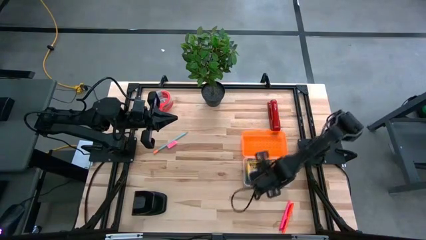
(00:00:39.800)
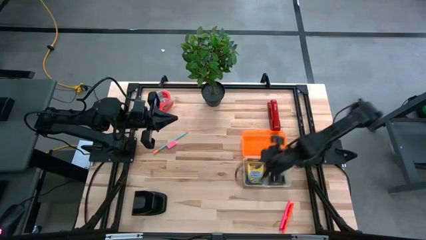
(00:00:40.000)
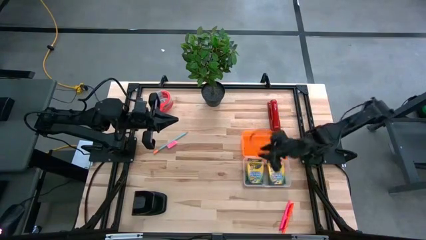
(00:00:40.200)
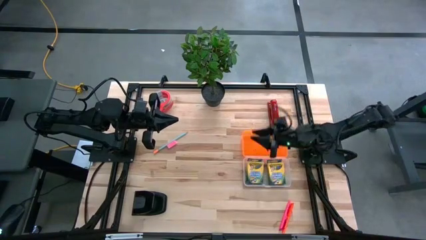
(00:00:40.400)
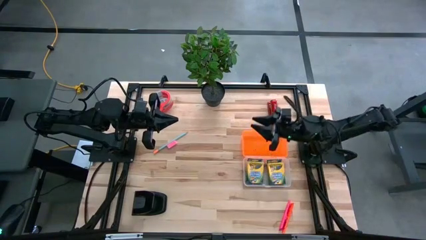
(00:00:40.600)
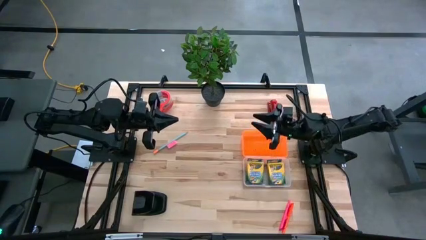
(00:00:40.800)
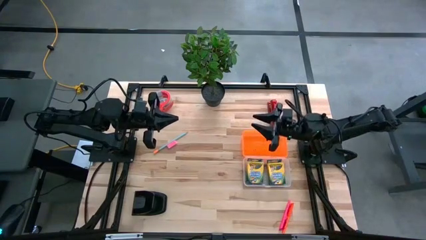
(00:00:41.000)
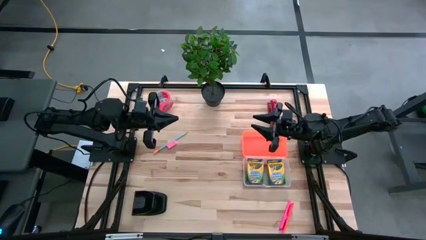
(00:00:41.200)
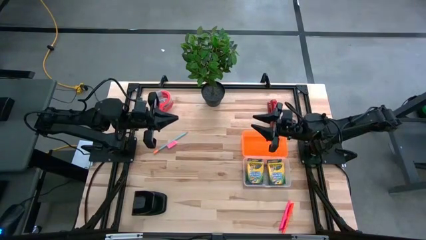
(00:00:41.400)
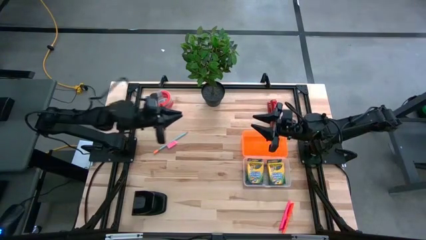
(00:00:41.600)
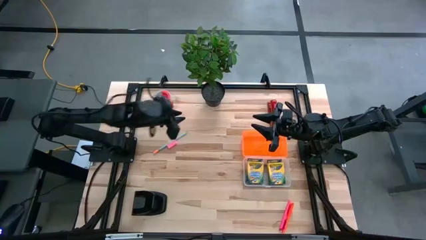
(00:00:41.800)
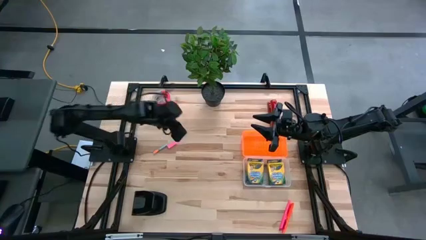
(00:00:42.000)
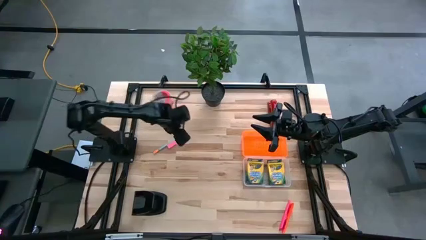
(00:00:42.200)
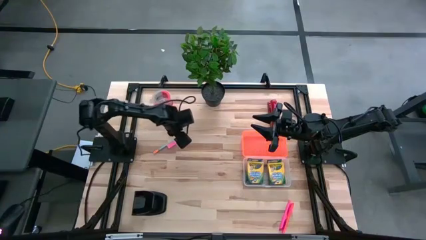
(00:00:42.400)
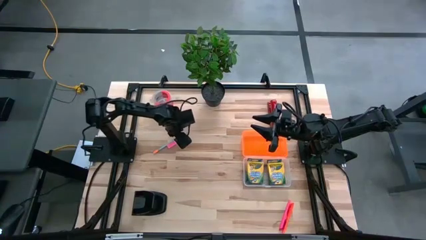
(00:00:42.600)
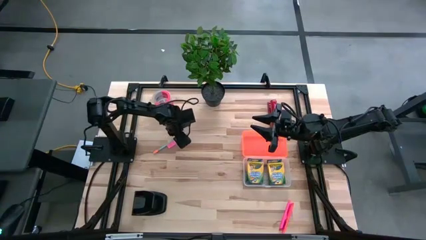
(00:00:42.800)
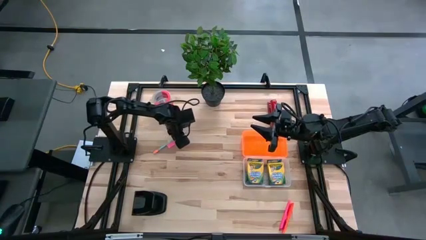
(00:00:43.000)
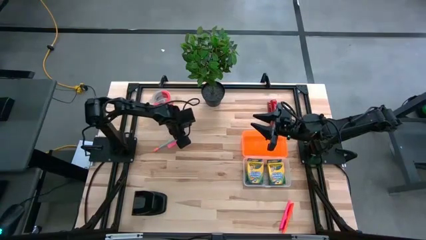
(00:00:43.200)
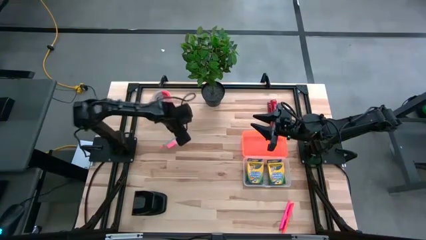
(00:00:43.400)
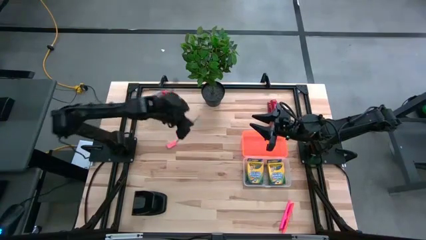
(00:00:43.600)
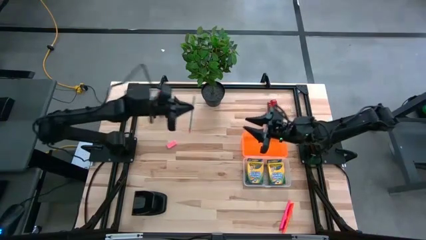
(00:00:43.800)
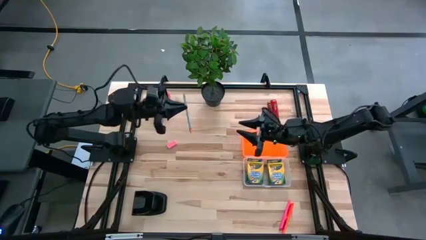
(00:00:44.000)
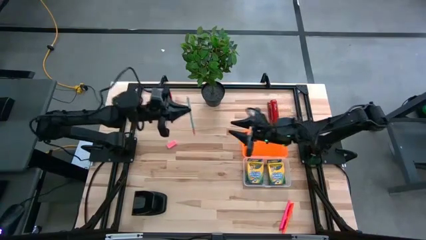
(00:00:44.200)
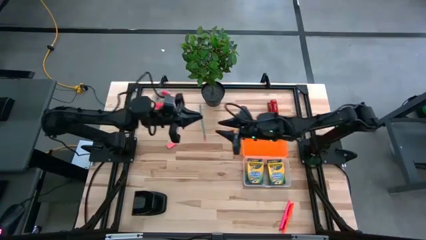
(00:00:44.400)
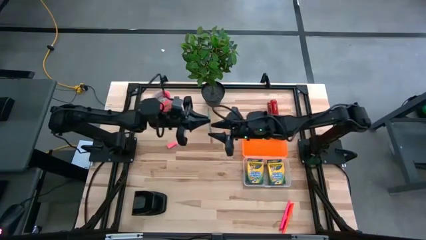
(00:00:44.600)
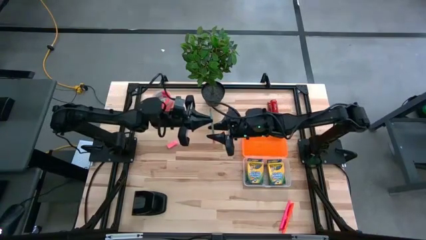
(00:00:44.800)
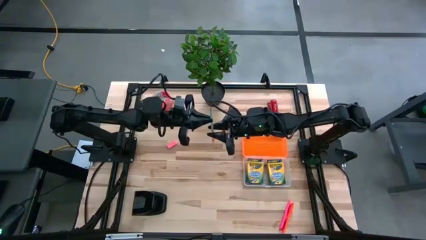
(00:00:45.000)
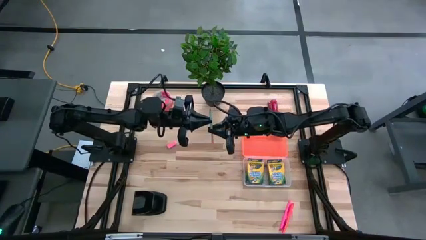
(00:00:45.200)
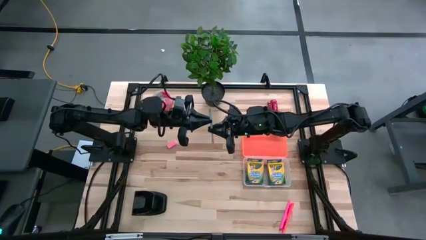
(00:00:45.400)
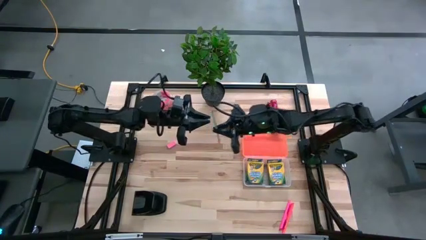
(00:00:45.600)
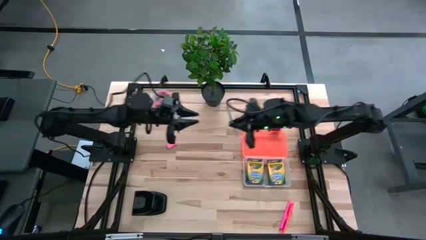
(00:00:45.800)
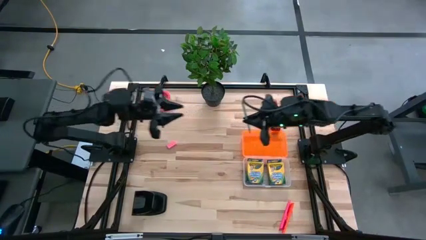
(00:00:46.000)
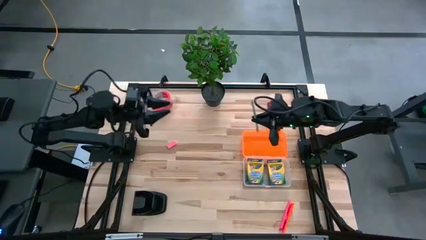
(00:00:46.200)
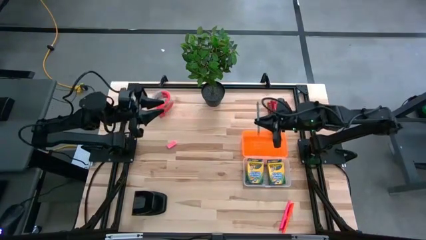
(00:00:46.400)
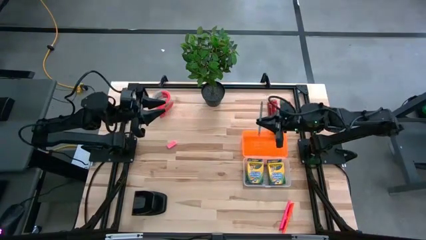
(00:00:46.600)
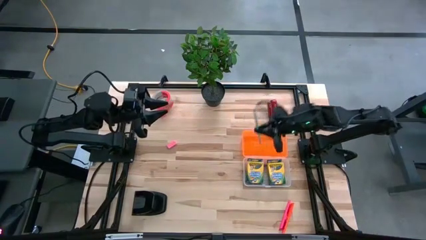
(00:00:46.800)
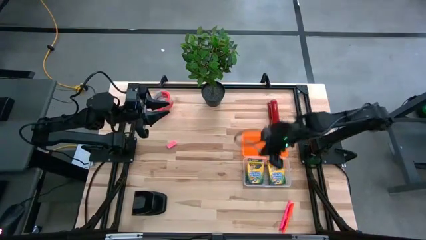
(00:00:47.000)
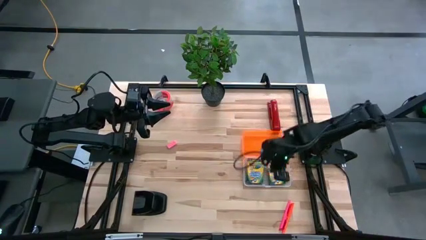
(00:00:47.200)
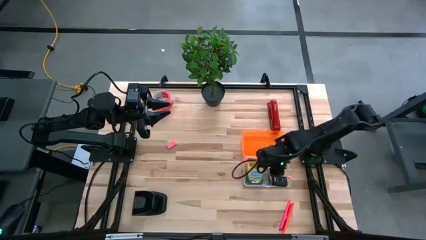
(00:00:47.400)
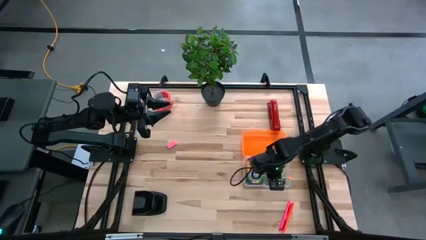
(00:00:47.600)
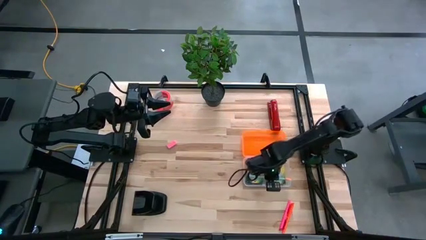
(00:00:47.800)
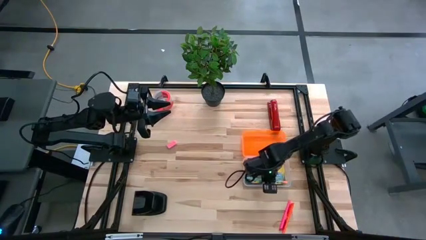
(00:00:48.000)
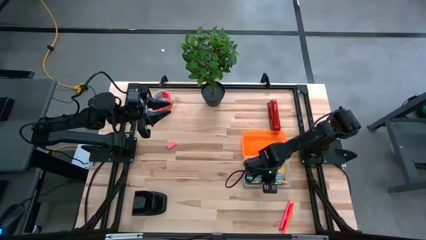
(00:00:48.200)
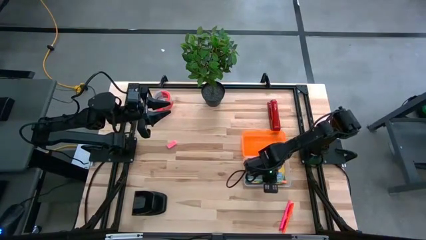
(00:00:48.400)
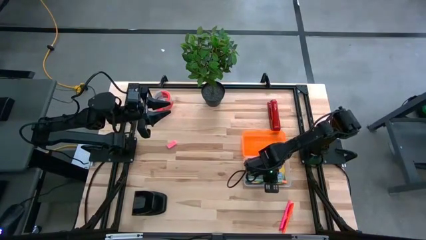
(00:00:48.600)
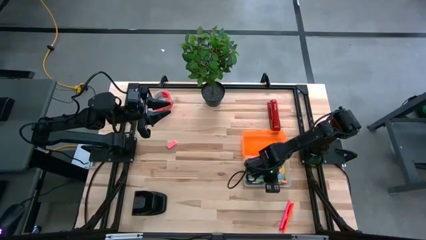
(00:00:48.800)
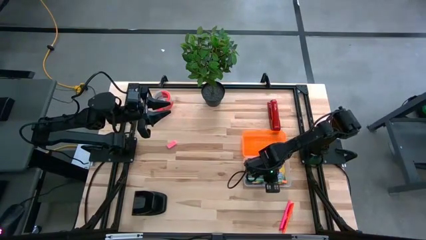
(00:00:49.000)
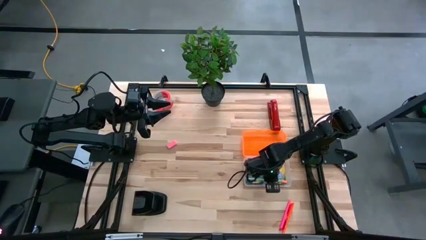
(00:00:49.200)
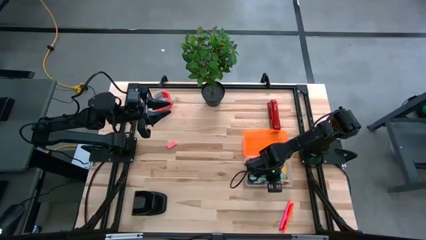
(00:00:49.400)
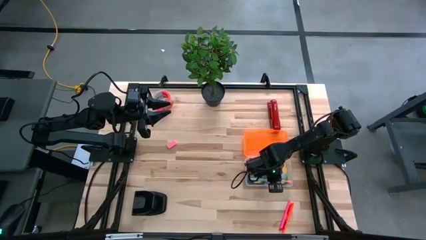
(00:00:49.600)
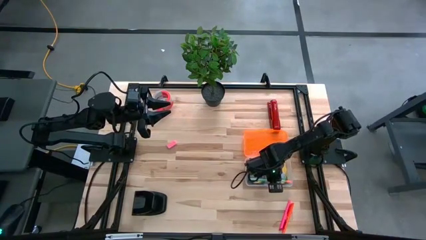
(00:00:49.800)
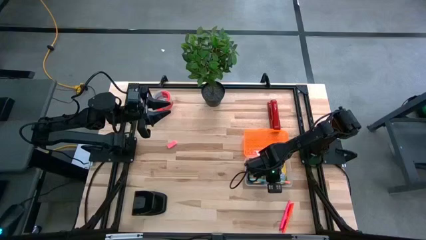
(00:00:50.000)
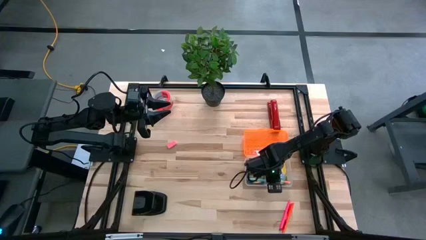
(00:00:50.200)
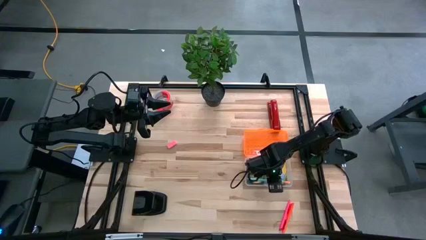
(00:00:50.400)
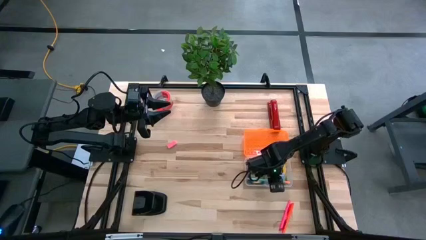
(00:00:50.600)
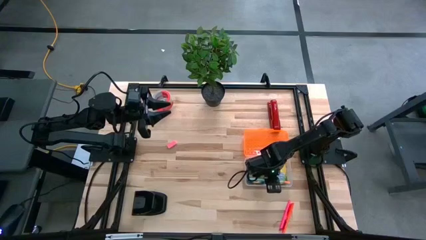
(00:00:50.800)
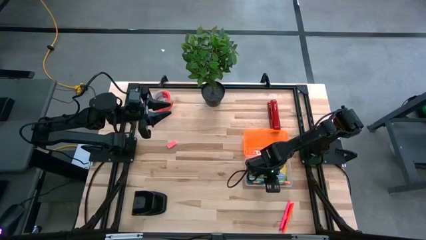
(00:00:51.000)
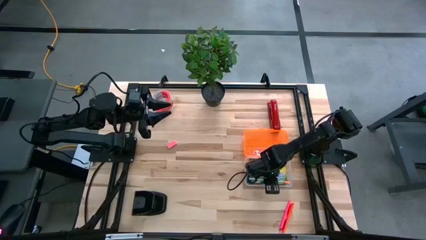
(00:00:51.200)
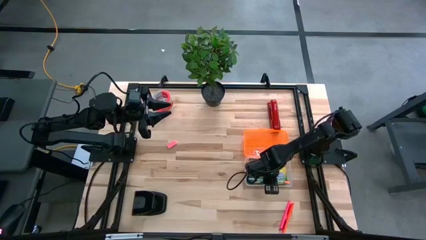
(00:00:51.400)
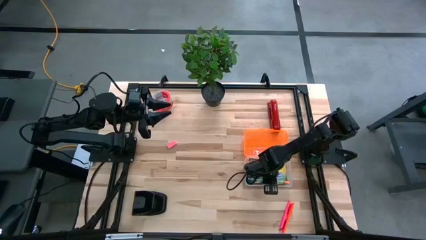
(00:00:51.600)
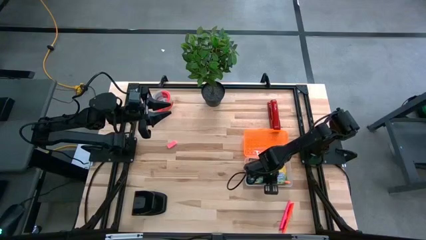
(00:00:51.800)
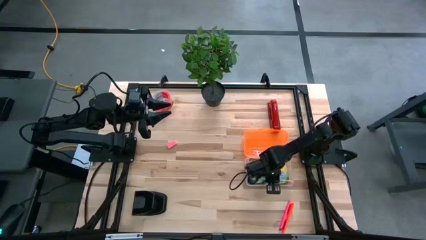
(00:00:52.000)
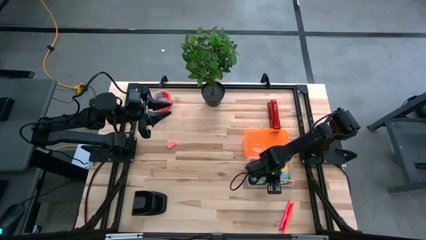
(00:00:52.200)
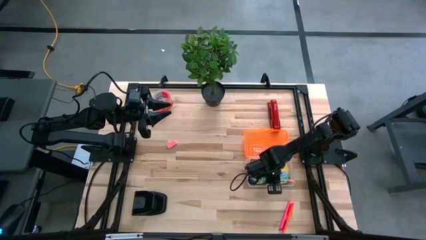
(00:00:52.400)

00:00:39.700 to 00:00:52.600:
Task: Pack school essentials
Put the light blue pencil into the orange supply box
